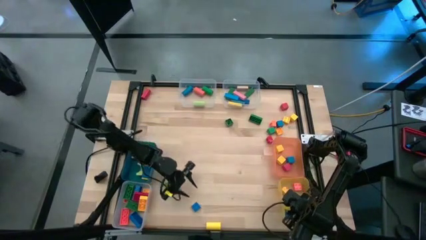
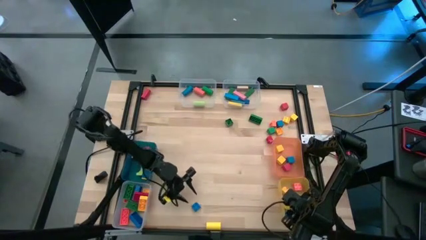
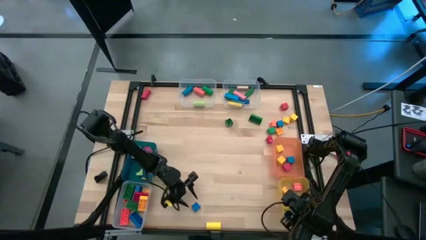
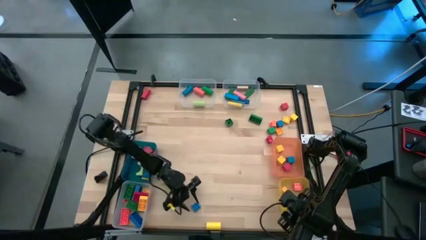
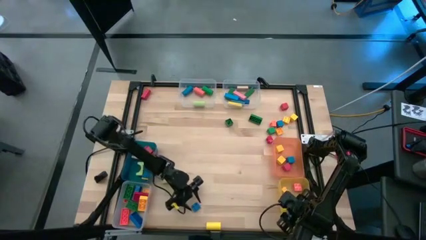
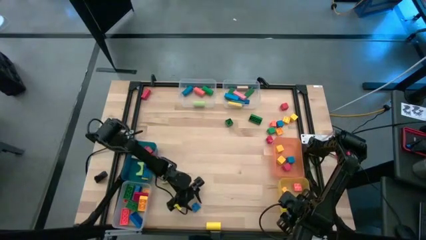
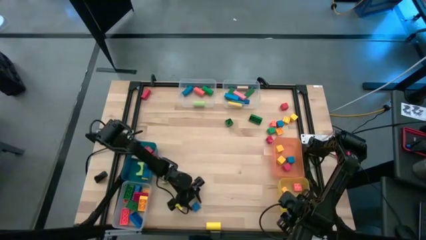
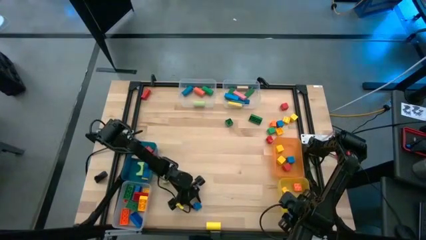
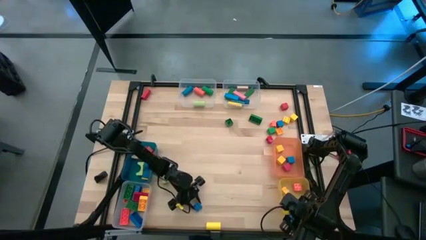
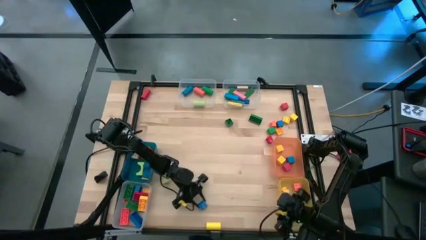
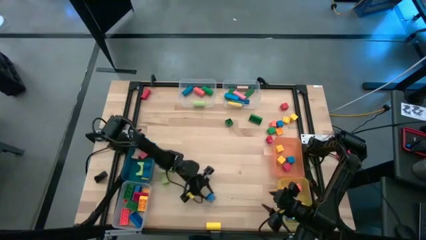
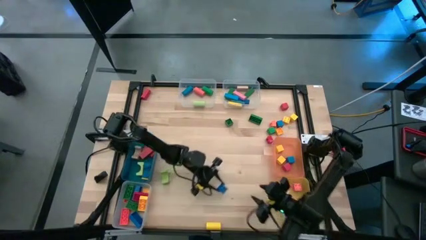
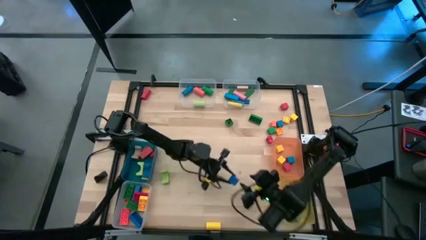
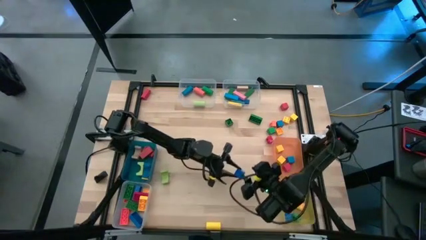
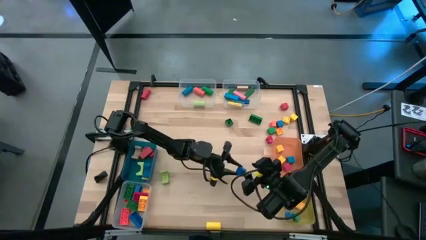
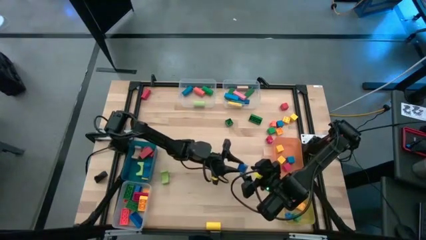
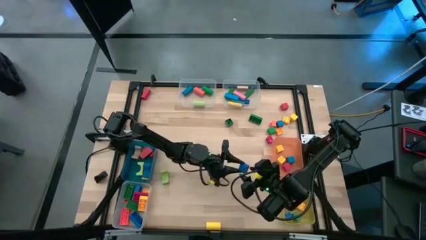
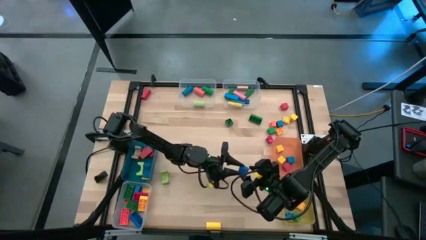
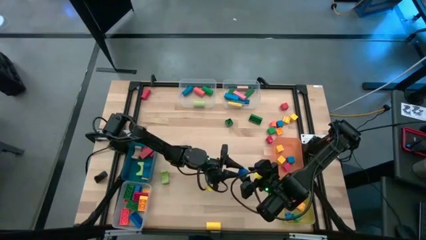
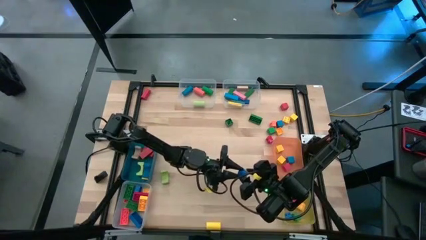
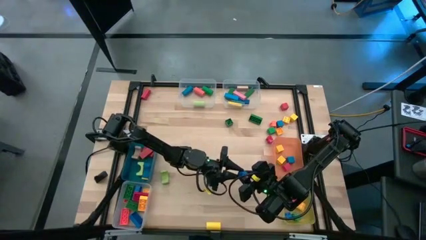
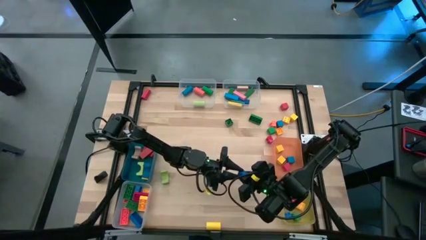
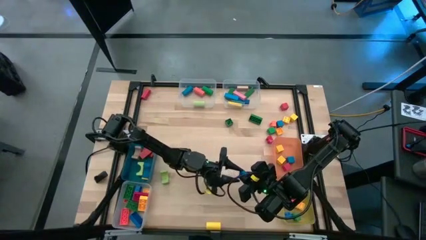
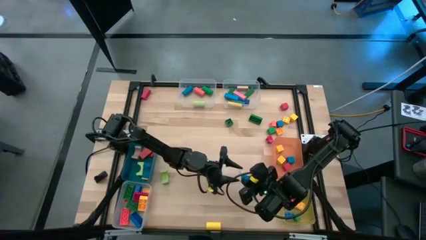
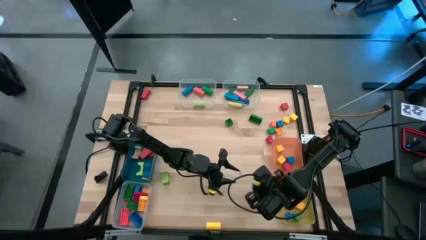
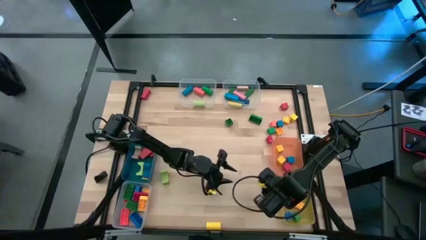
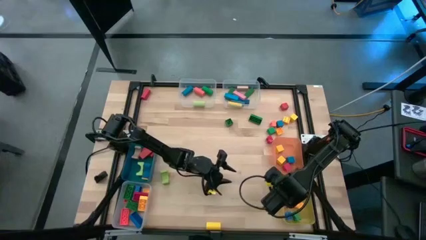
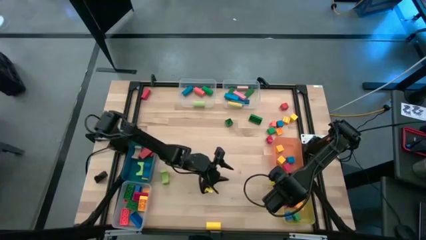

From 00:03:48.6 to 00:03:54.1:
Task: Sort blocks by size
Put the blue game piece into the yellow bin

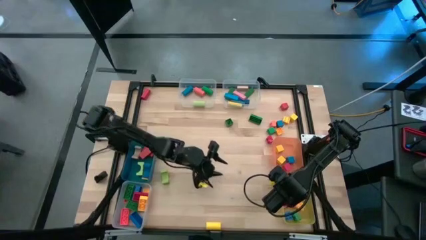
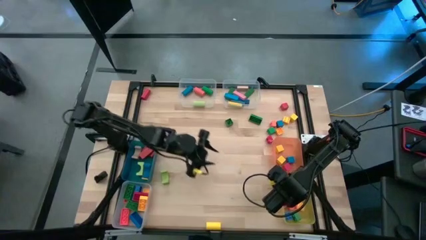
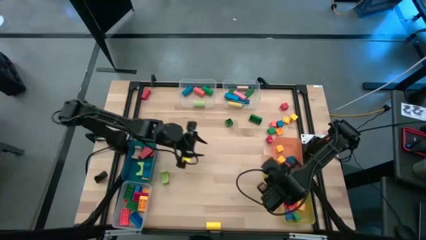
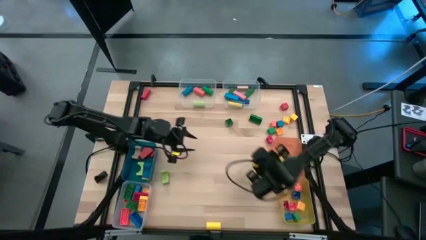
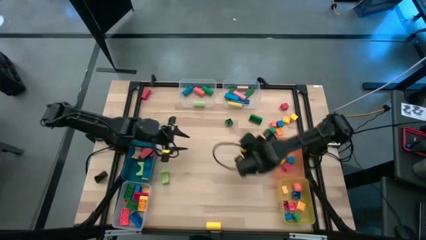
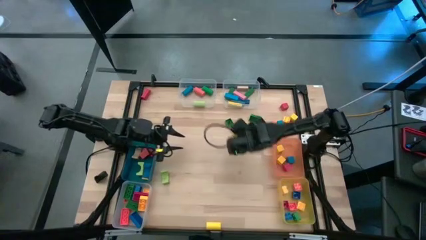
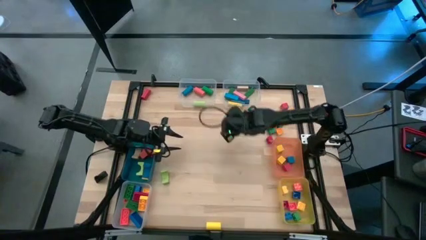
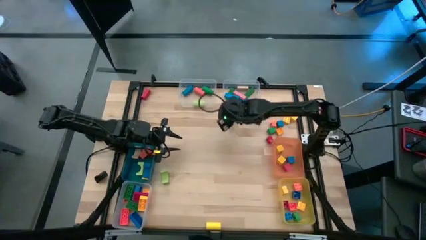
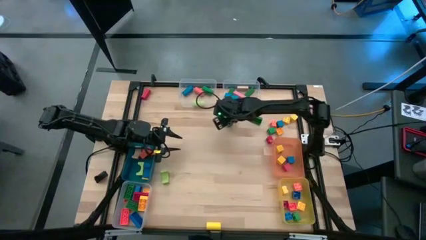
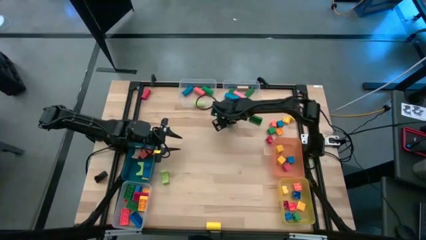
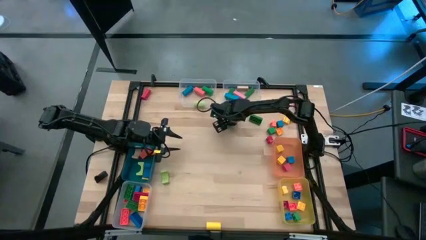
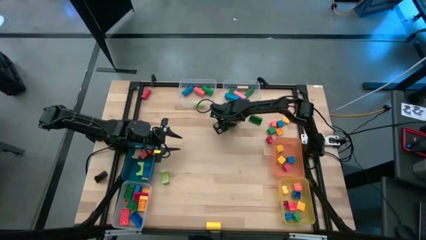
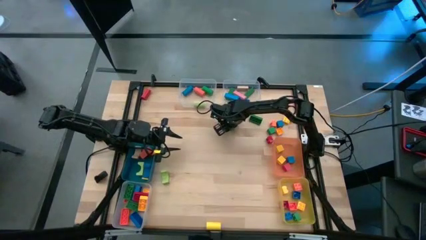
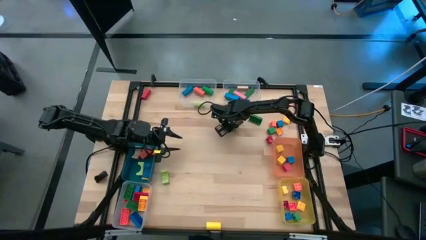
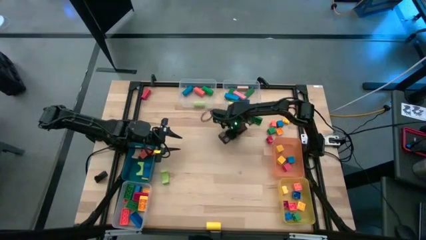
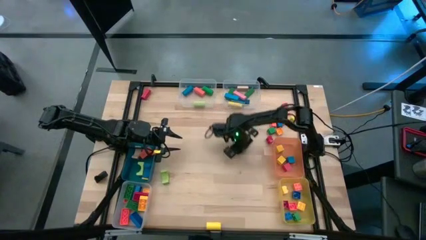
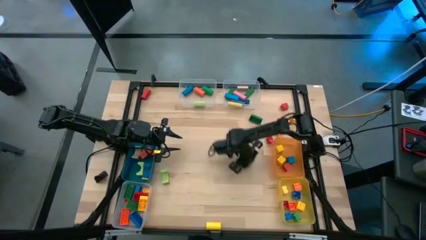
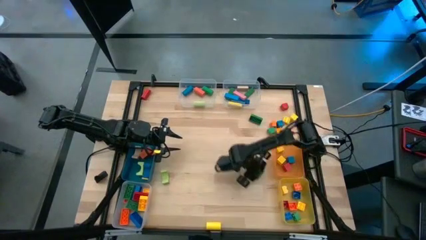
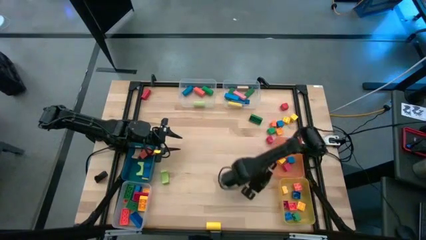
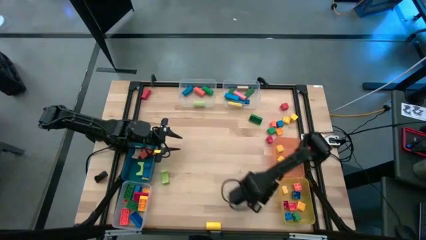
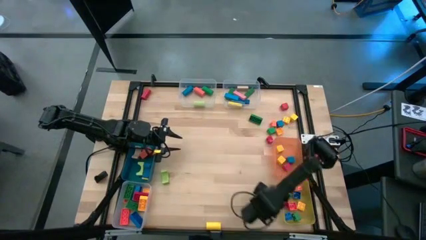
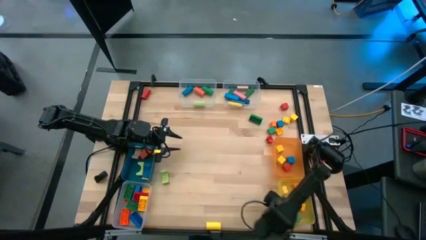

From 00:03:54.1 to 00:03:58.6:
Put the green game piece into the yellow bin

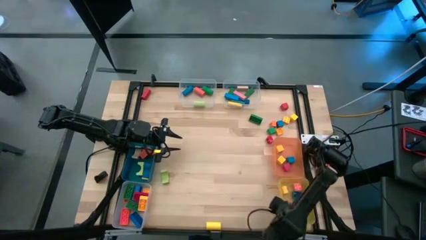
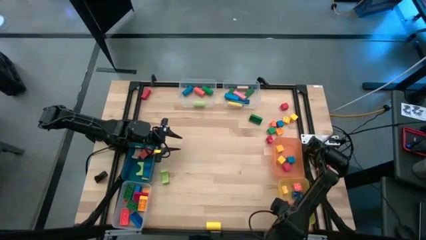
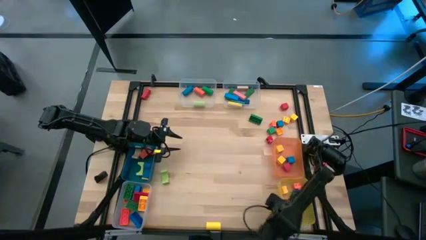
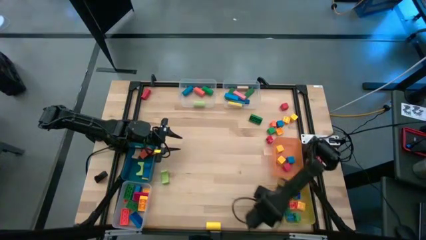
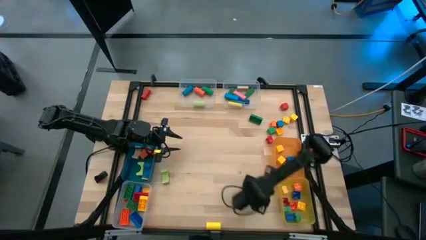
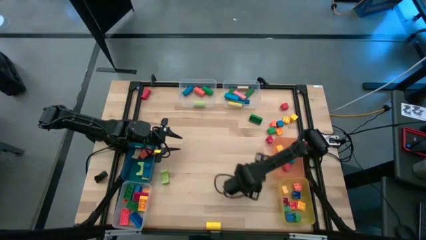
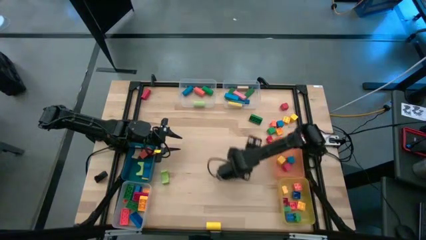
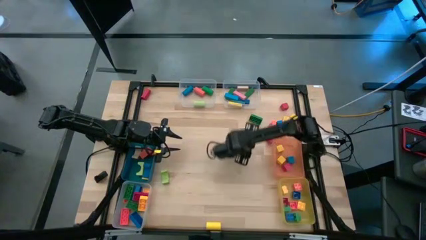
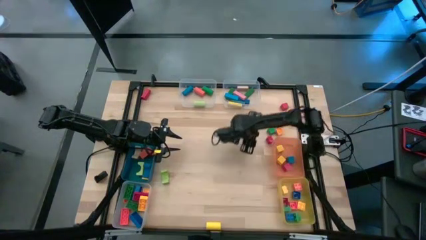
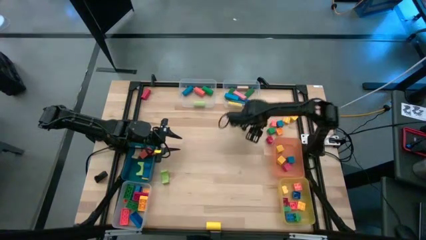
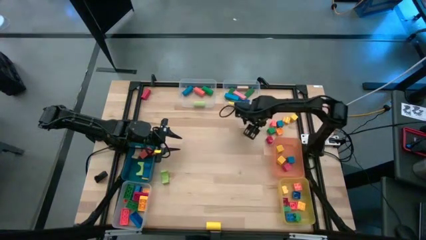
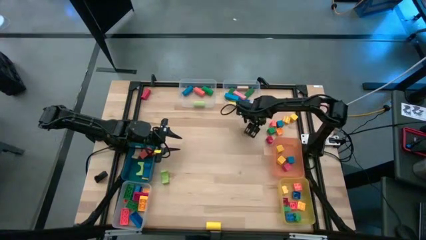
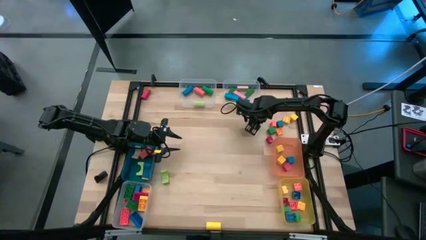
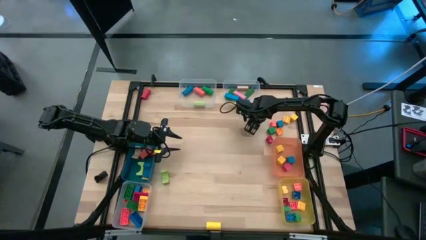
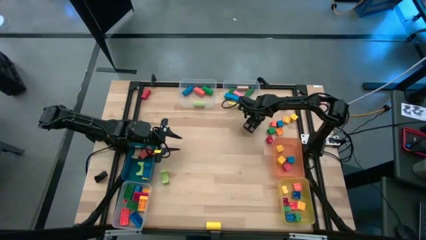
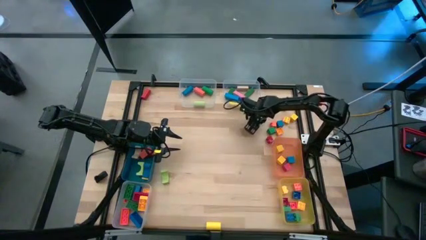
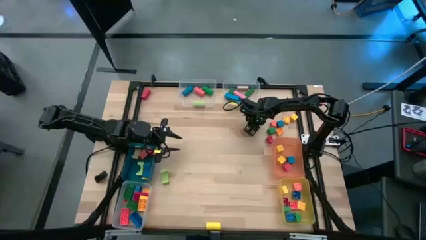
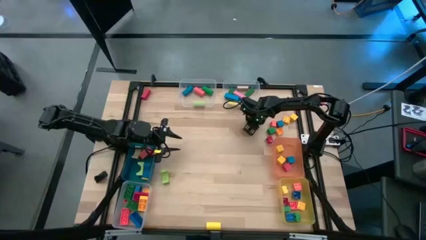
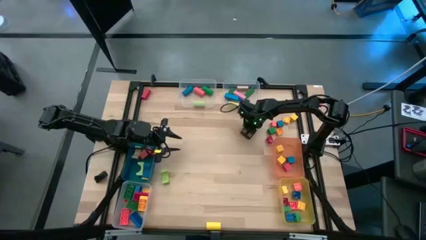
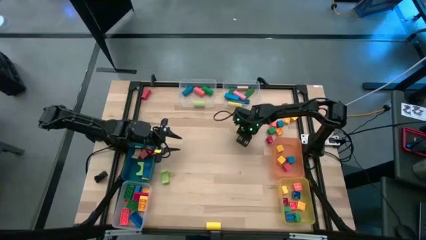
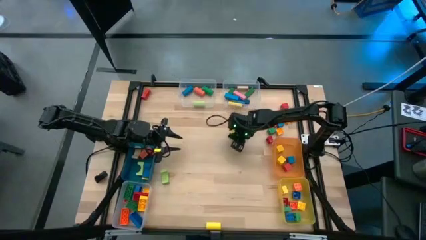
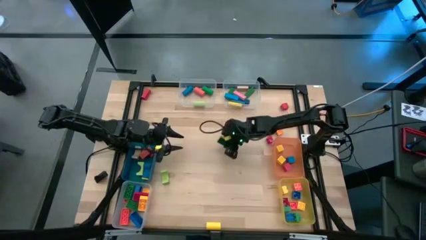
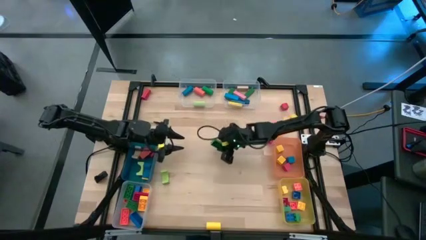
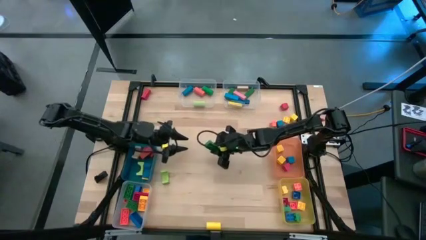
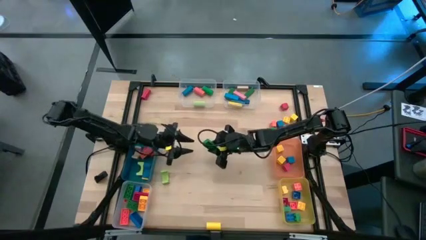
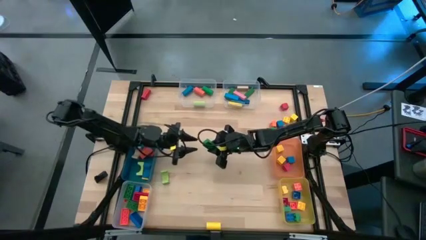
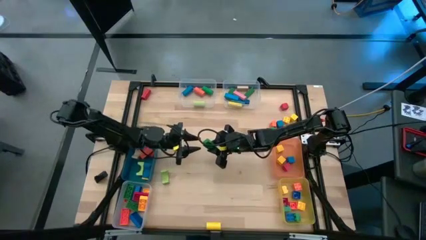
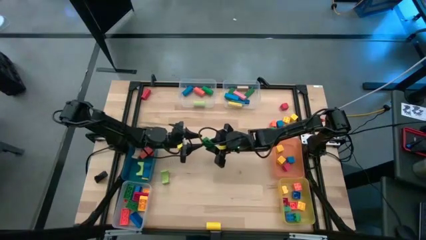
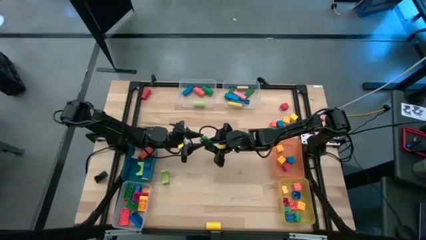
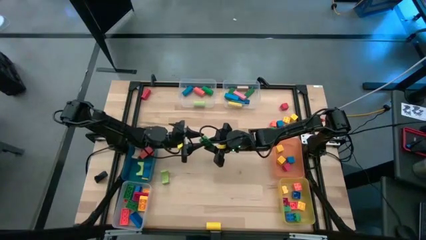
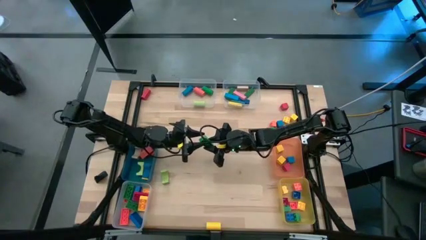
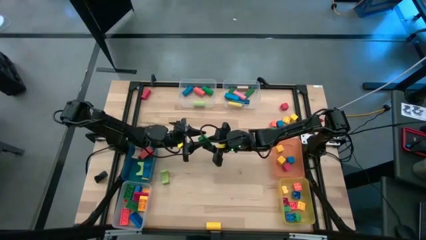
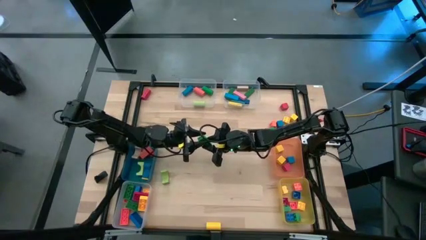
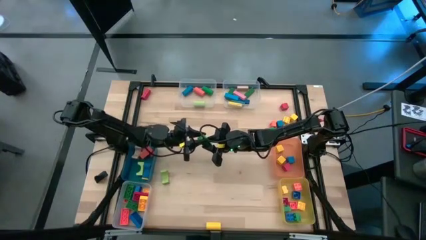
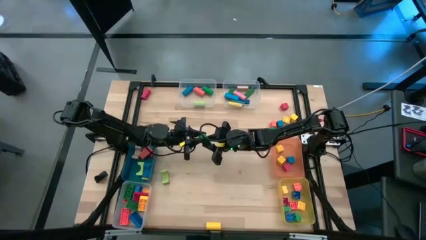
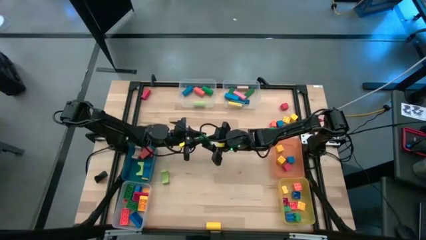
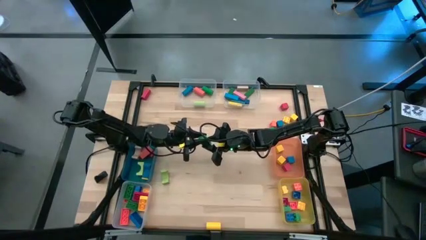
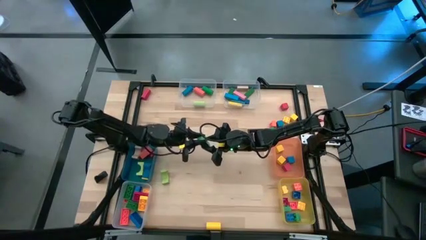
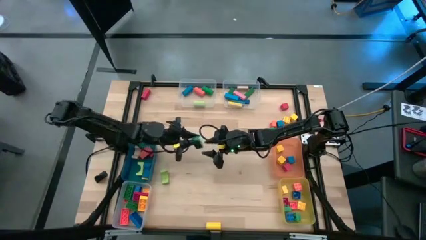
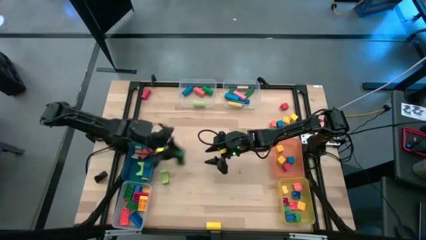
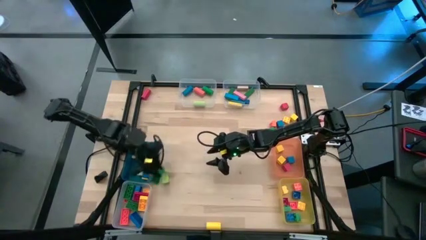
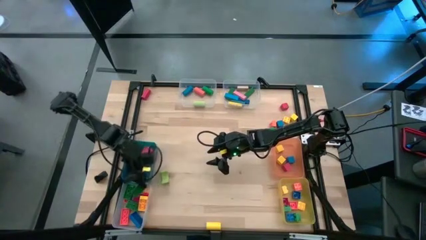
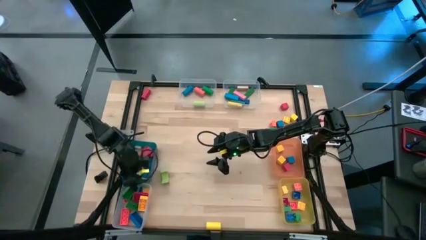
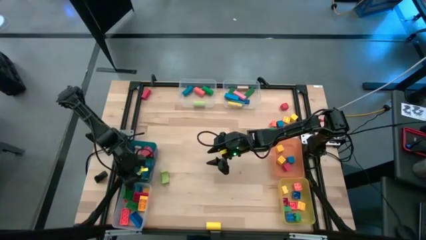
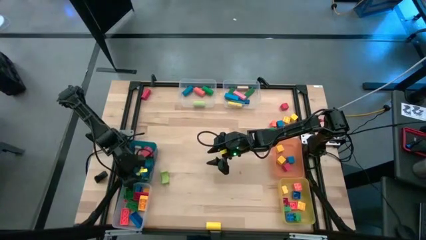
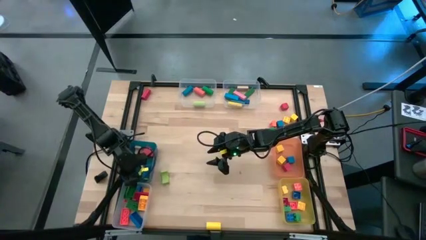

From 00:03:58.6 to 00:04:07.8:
Put the green game piece into the bottom left transparent bin
